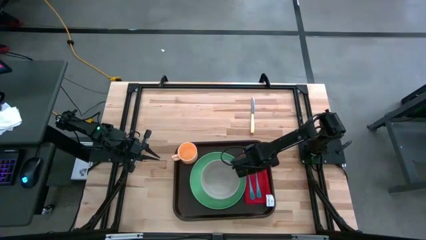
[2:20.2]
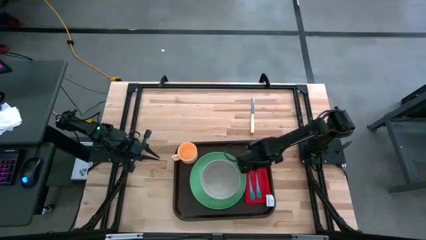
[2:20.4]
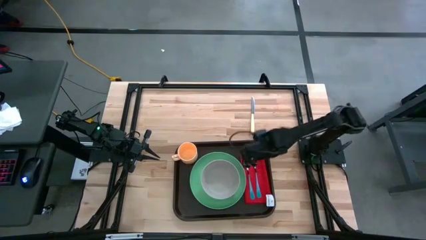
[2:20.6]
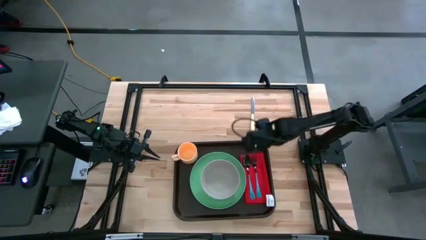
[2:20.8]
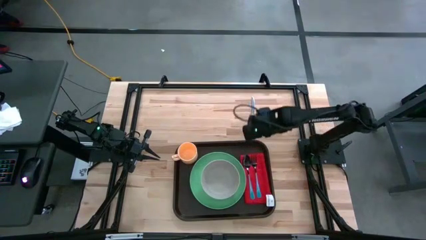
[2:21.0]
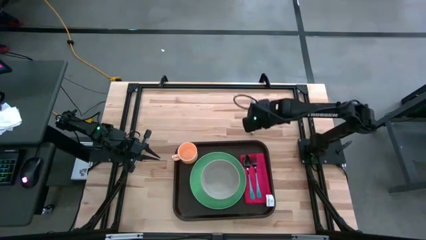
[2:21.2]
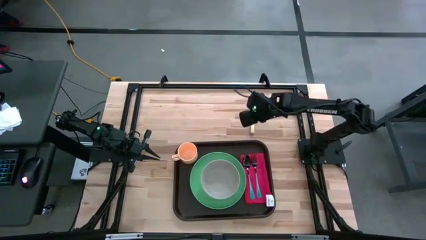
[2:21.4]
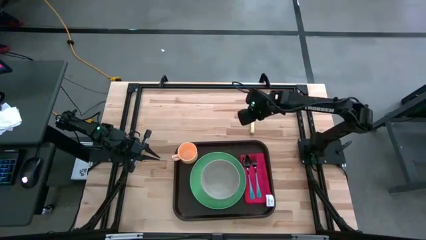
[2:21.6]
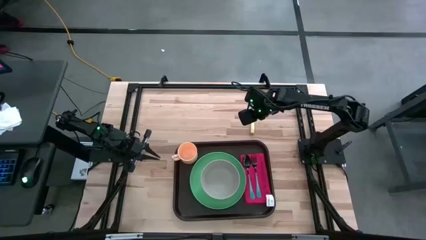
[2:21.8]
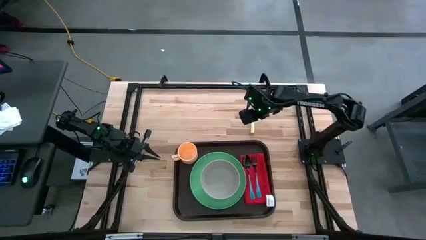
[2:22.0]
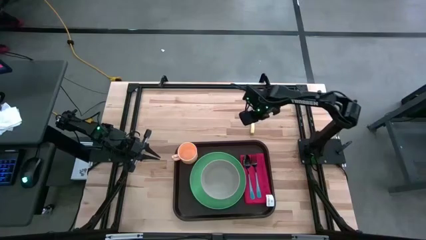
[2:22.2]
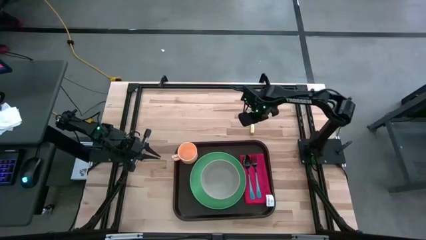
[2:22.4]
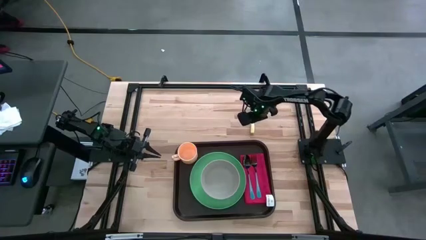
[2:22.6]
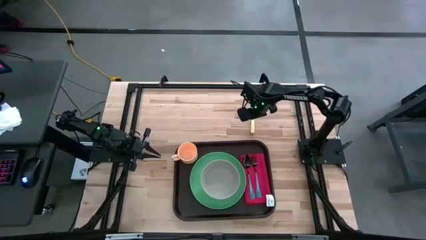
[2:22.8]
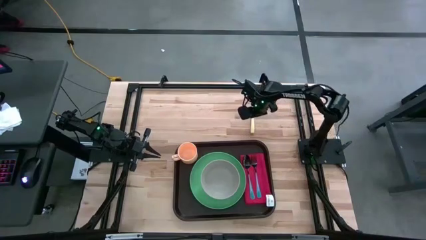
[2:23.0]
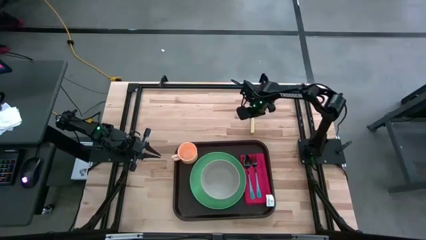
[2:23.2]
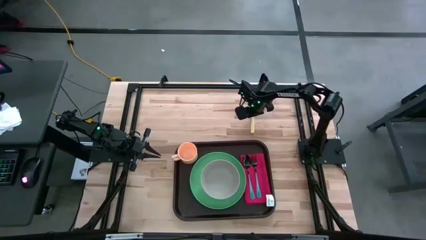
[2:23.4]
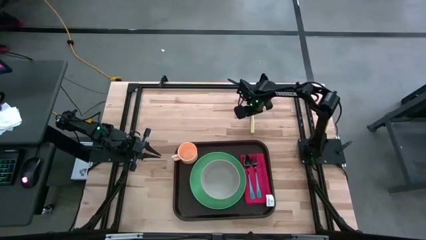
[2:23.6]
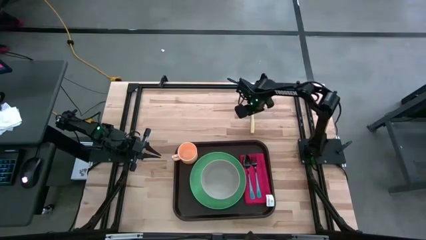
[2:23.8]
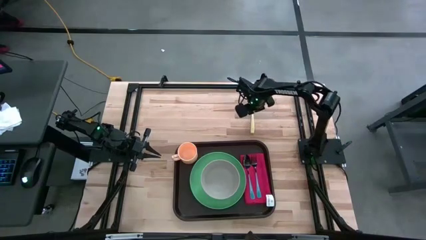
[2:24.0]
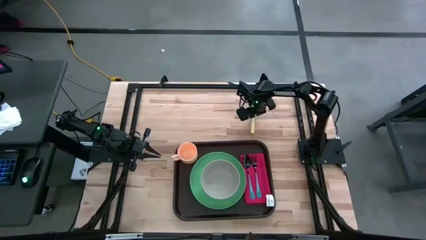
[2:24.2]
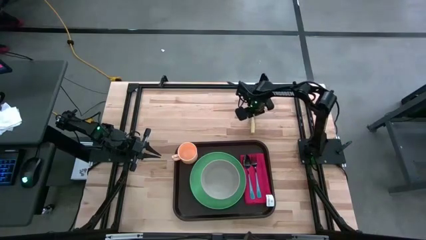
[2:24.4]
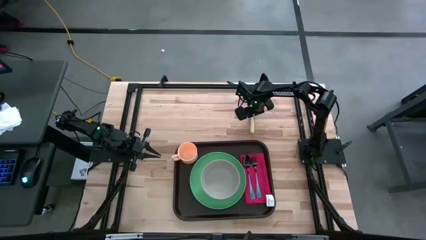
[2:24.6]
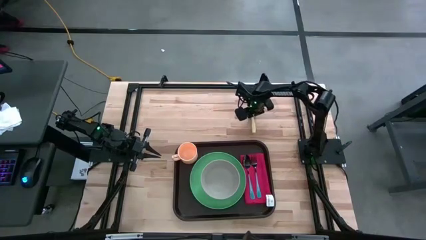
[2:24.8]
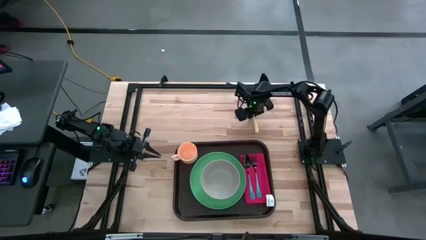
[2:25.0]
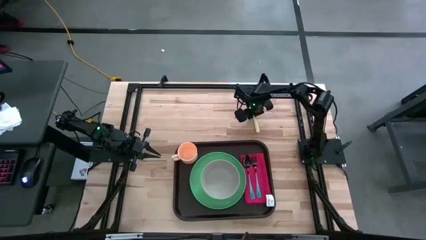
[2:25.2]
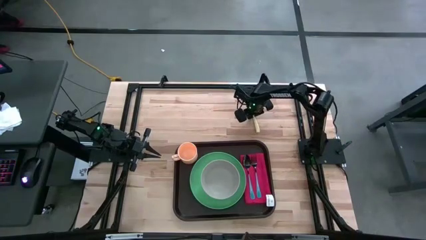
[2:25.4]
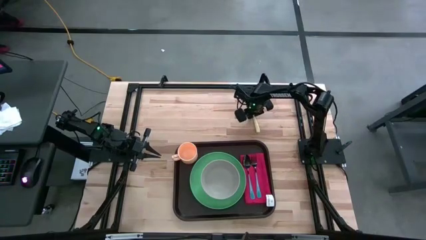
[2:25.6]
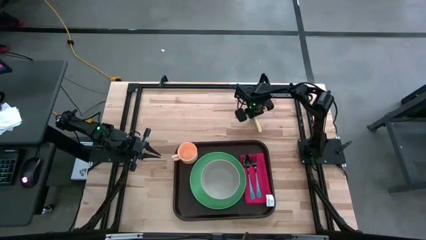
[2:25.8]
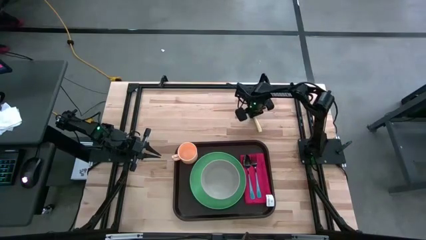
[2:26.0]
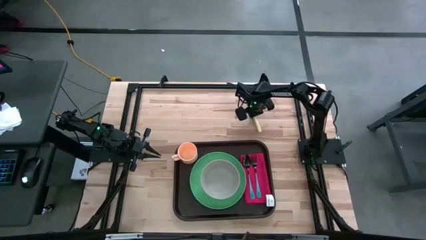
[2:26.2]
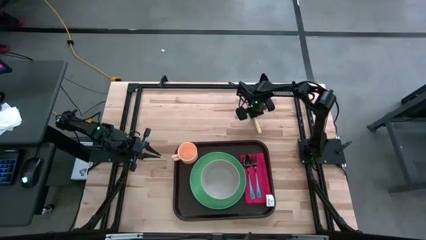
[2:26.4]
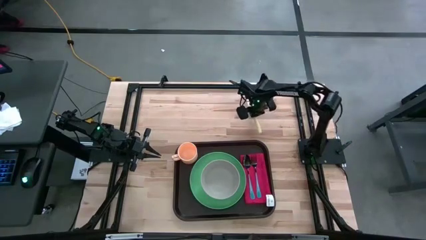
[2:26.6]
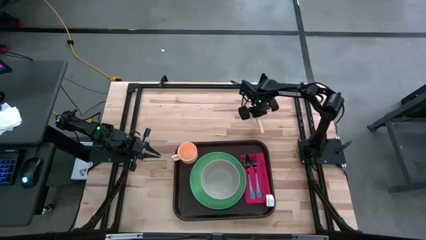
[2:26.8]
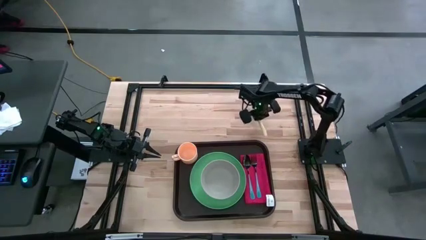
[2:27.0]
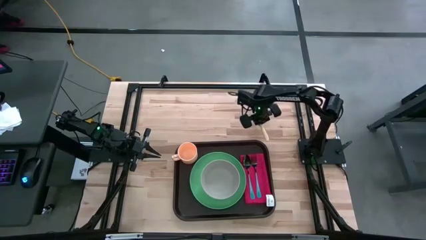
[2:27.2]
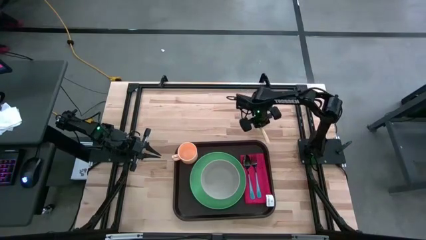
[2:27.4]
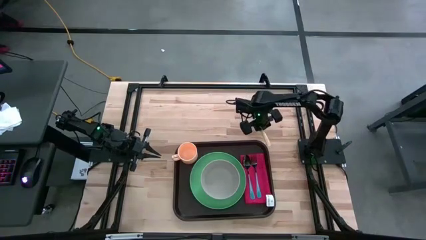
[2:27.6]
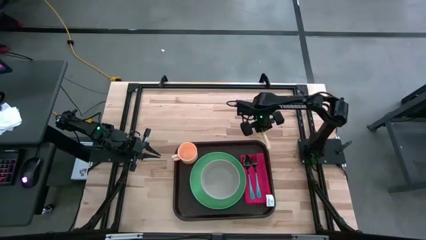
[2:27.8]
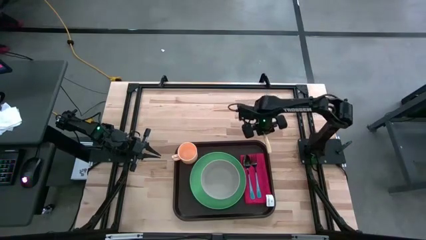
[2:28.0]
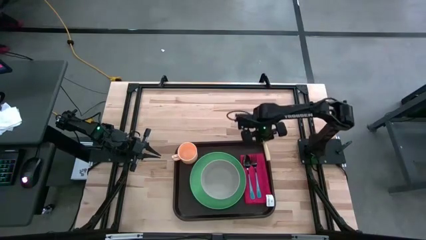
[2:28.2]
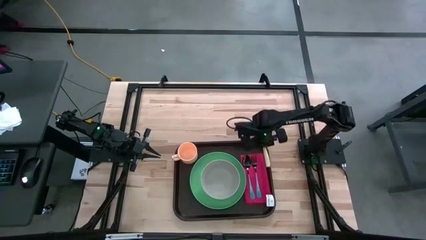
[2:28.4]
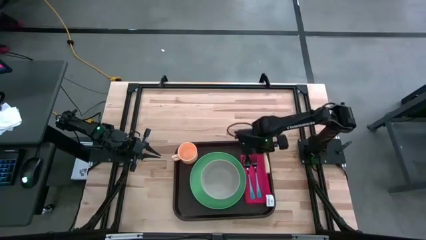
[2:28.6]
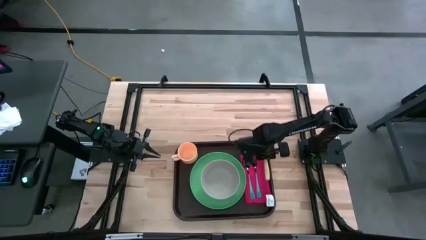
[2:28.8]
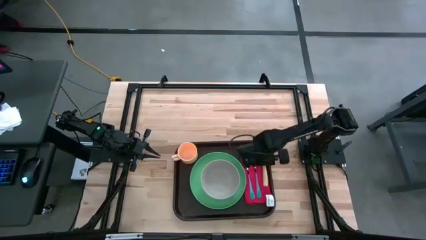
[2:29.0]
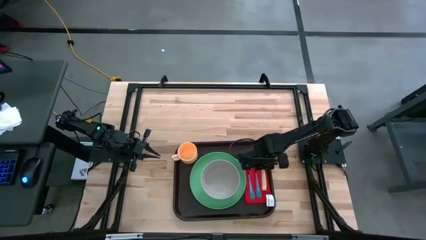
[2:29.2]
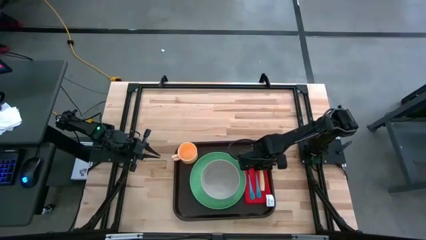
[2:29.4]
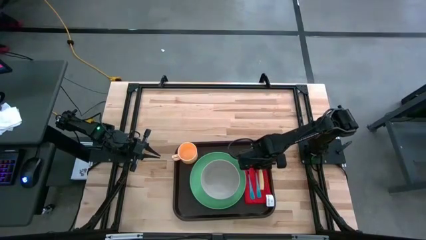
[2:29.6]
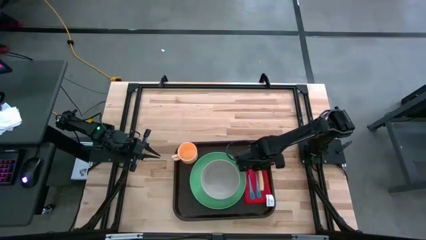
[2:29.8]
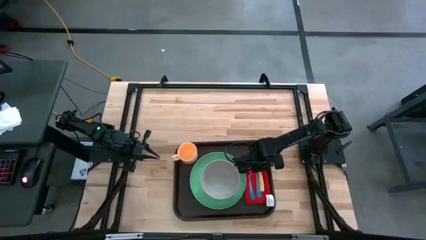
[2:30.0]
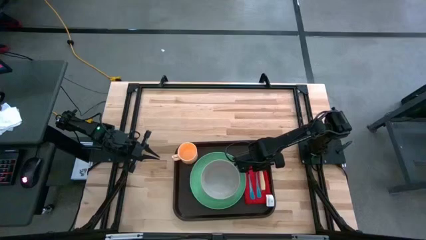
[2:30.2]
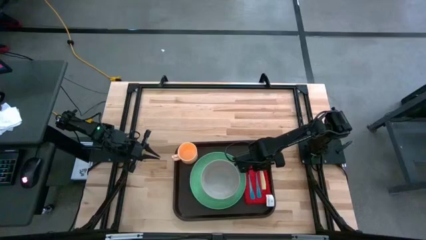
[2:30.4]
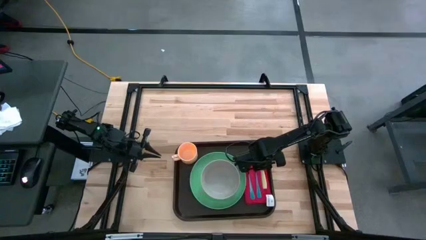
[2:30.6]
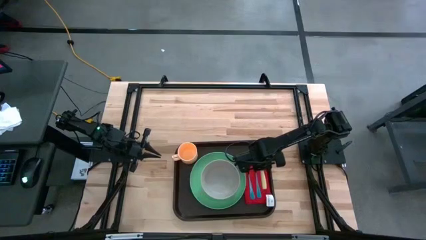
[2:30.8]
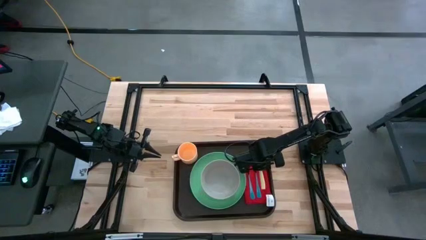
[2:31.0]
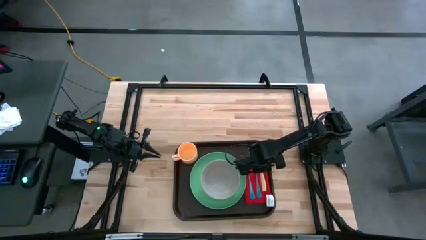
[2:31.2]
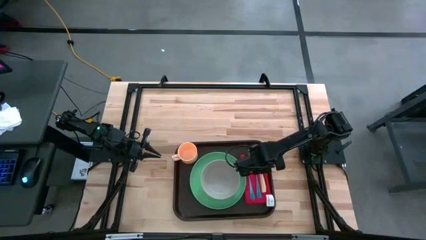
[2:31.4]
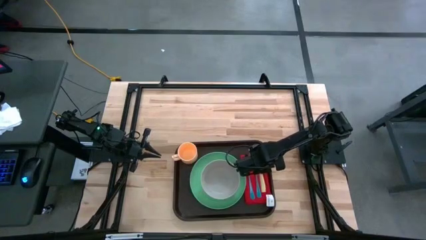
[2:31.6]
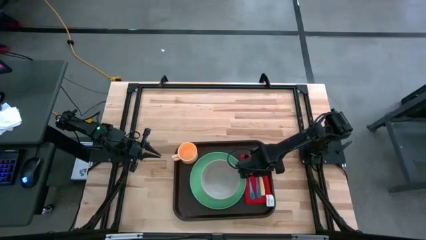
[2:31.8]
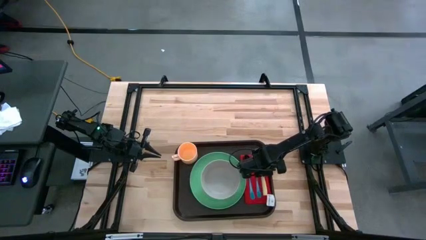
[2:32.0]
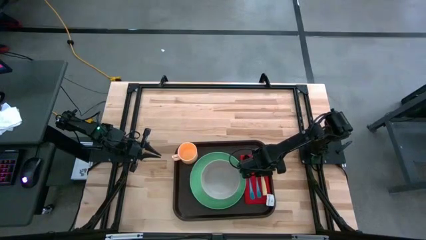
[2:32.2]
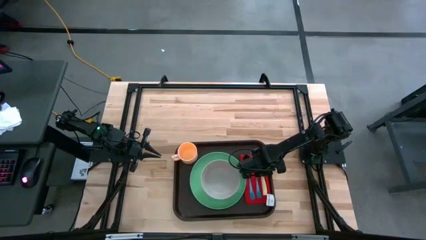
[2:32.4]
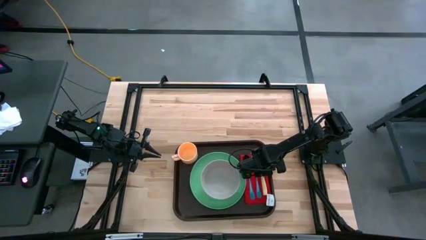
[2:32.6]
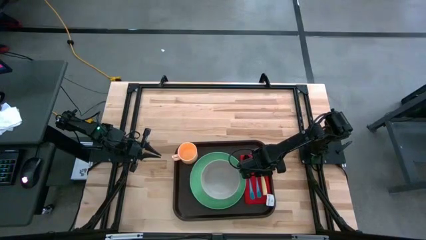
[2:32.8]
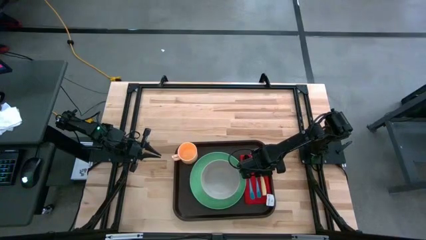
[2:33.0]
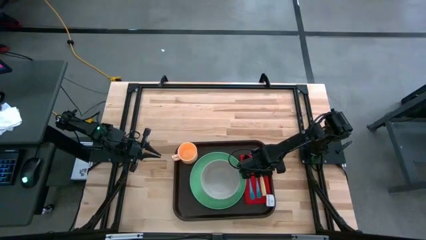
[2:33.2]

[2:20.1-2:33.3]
Task: Set up tray
Put the yellow knife to the left of the blue fork on the red napkin on the brown serving tray
